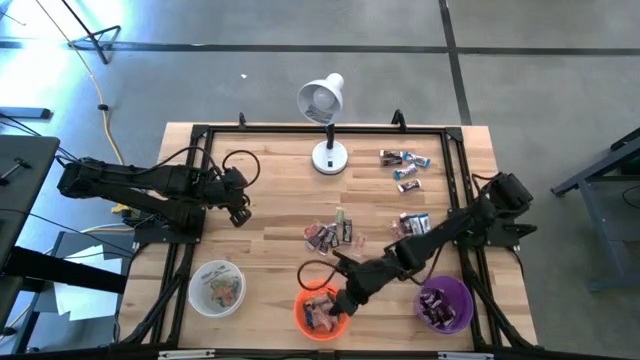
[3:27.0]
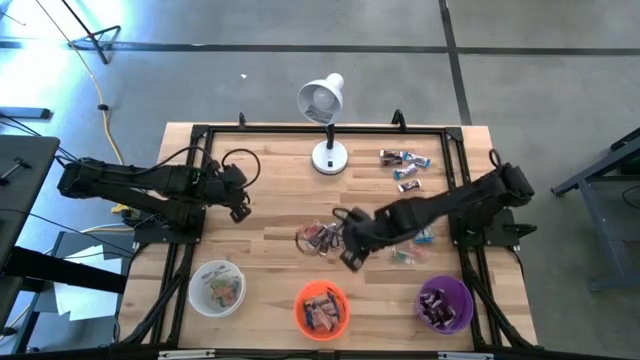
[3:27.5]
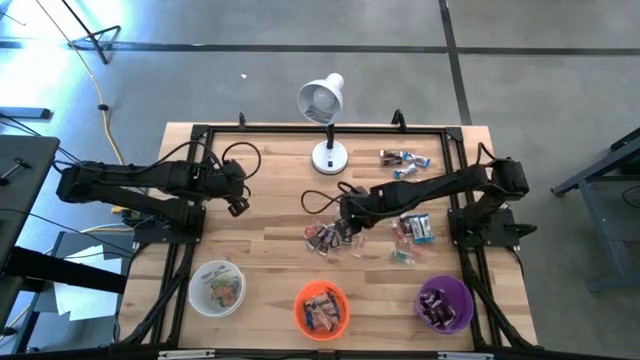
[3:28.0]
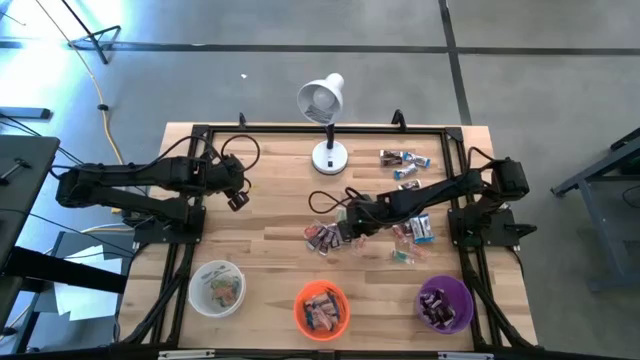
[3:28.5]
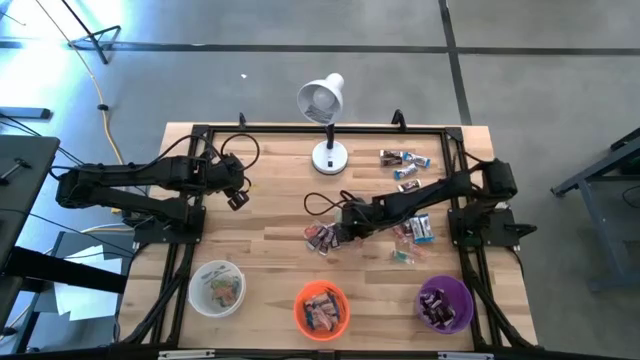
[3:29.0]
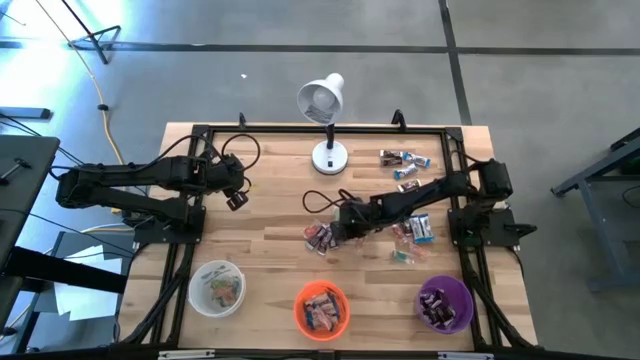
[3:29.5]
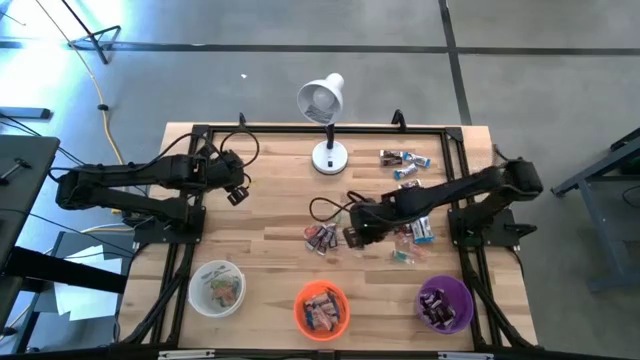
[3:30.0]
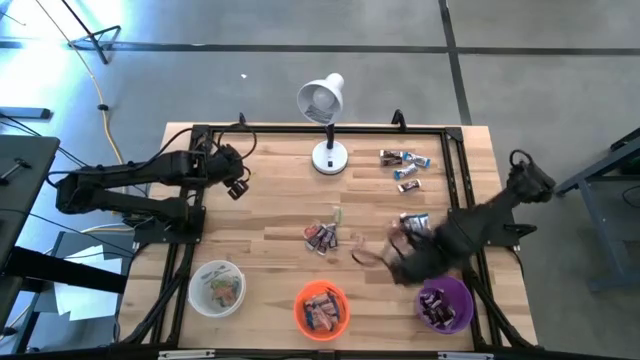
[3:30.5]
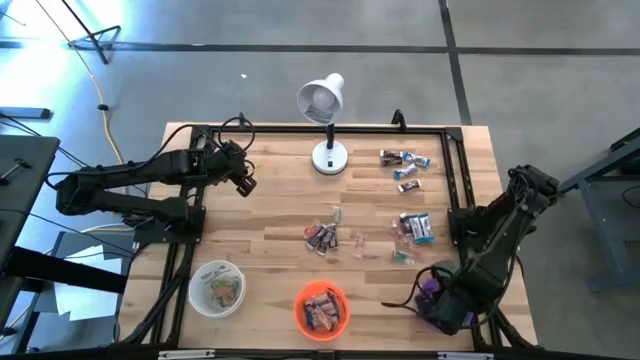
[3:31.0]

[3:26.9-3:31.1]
Task: Organize candy in baskets
Put the brown chocolate bar into the purple bucket

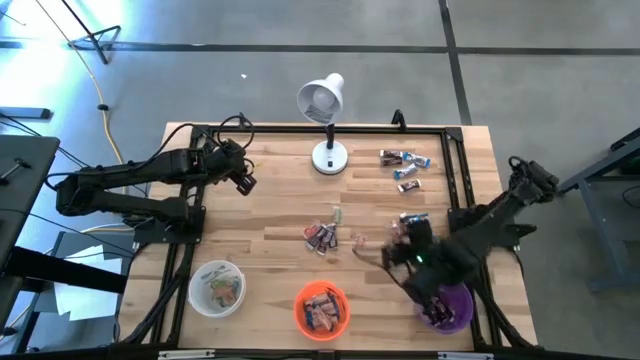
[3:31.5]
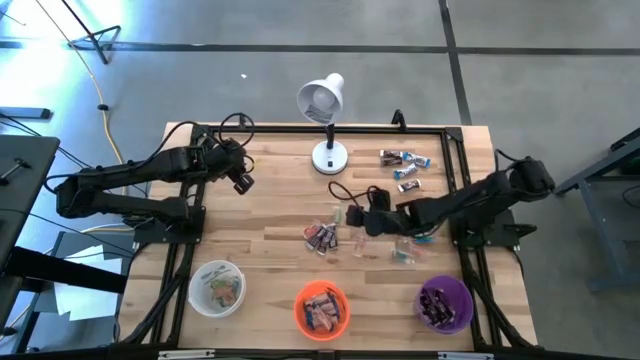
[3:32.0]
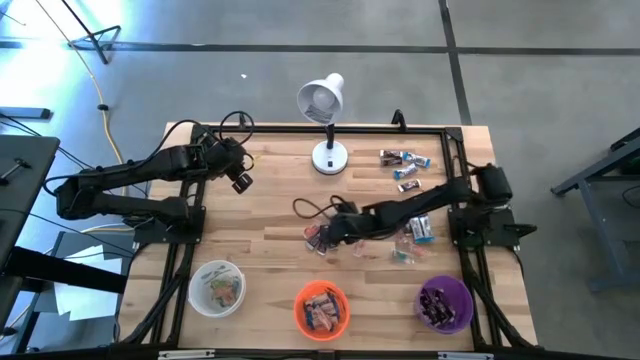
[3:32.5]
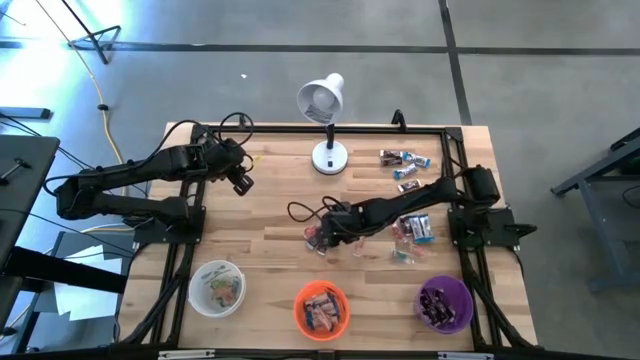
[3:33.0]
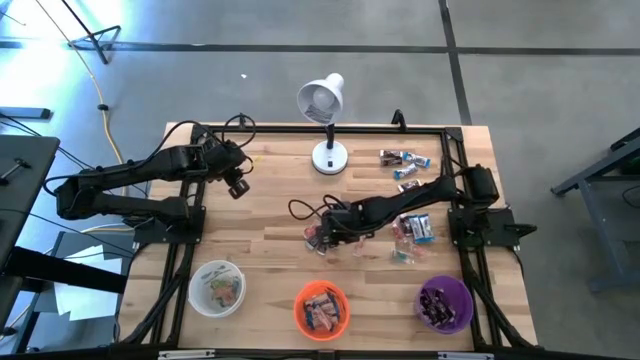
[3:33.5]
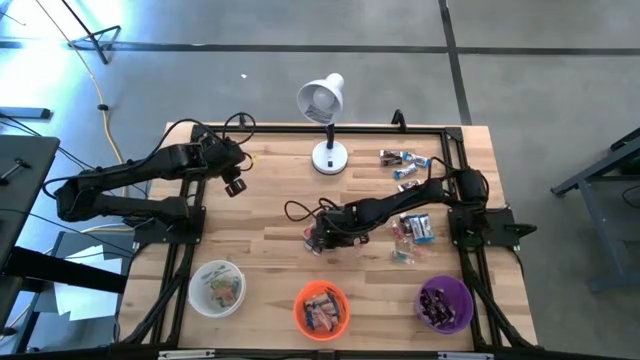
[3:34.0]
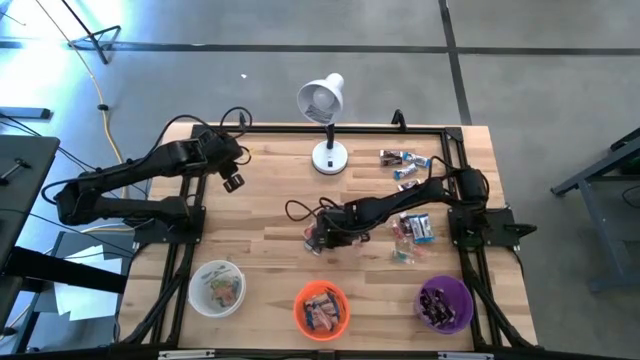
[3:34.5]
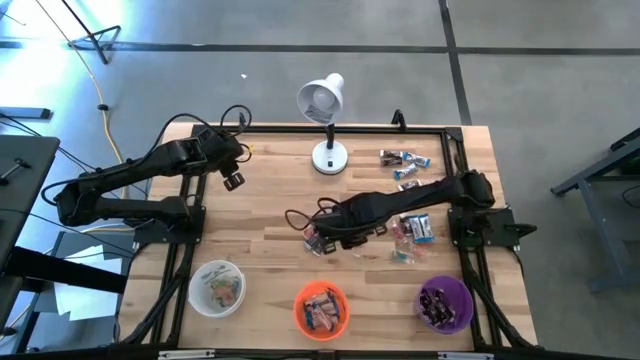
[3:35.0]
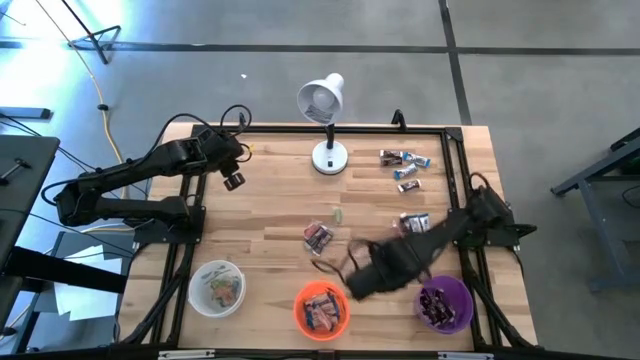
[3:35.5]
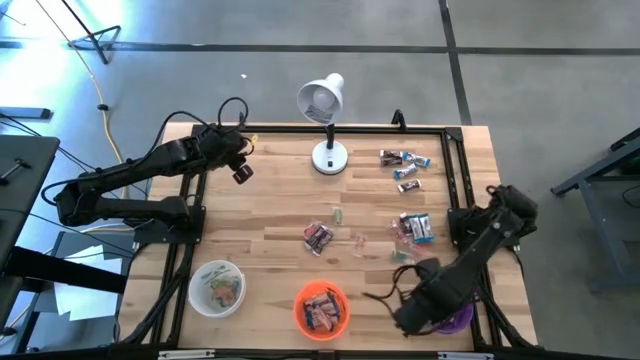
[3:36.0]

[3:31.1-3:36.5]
Put the brown chocolate bar into the purple bucket

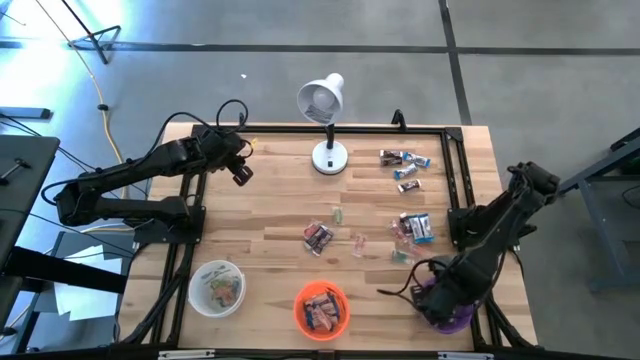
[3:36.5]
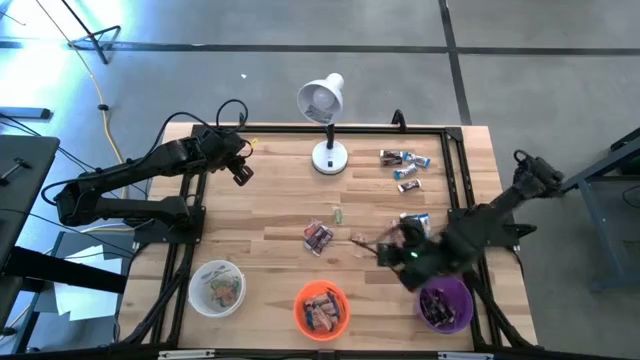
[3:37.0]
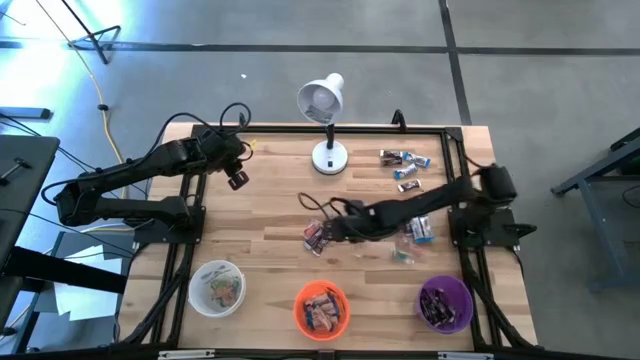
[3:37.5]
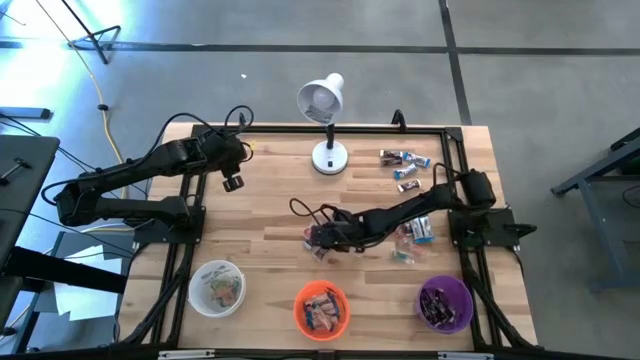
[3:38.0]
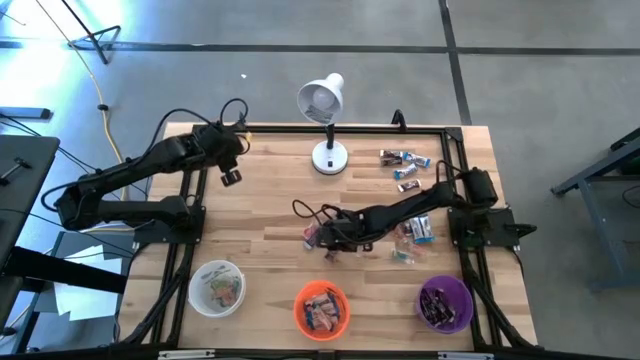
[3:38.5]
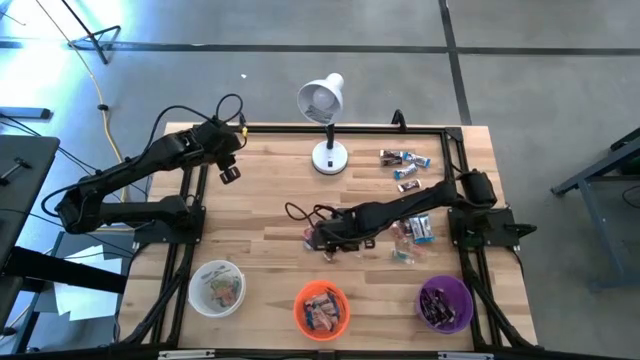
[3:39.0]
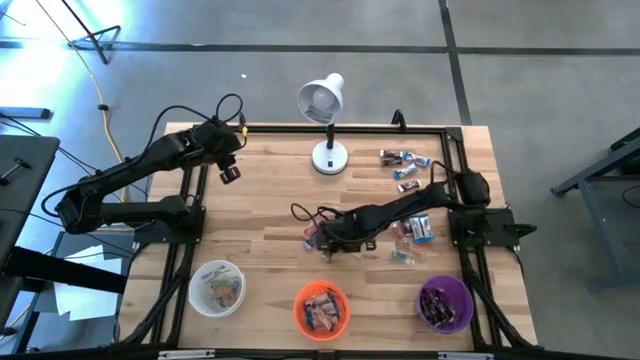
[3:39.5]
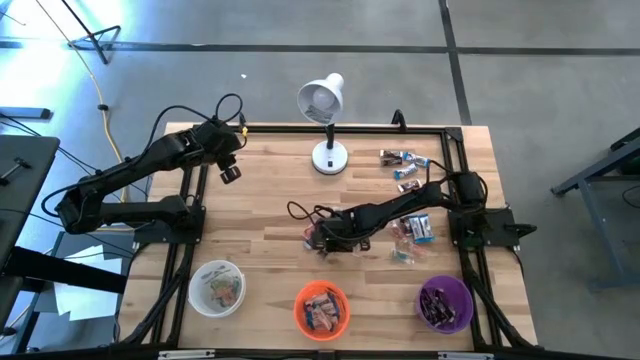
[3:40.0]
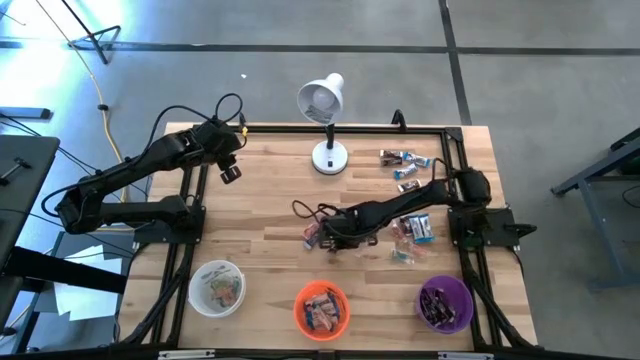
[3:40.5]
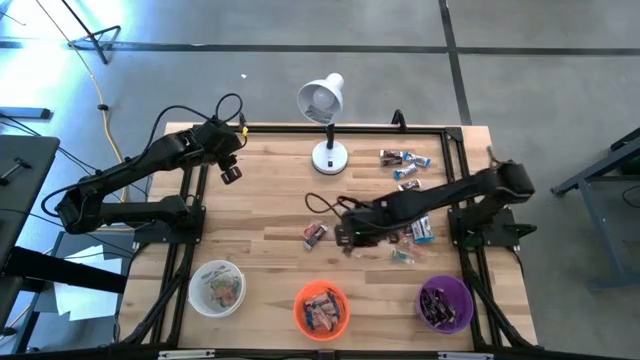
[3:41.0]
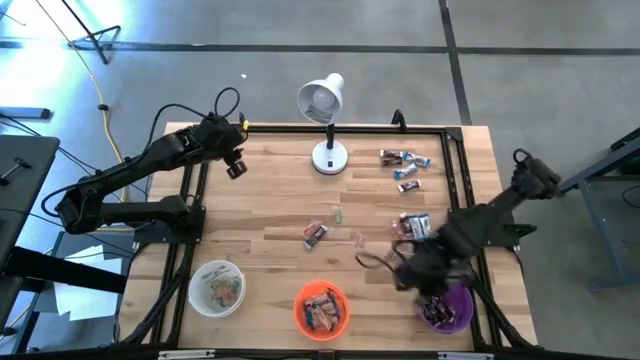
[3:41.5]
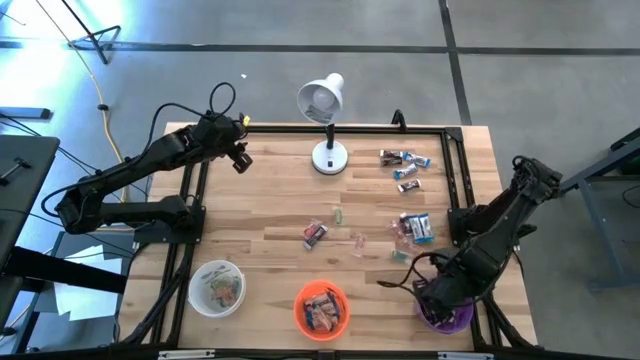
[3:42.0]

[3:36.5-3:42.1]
Put the brown chocolate bar into the purple bucket

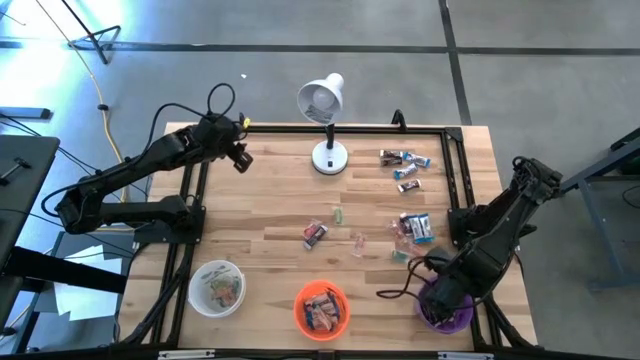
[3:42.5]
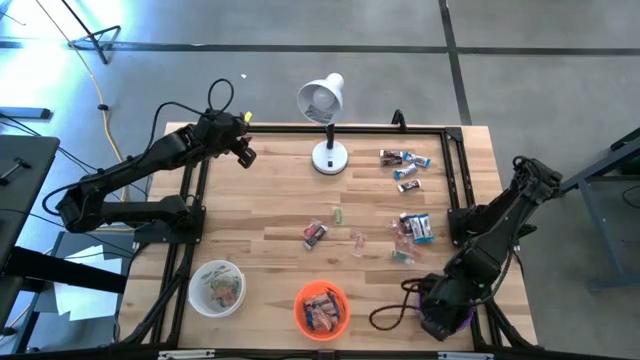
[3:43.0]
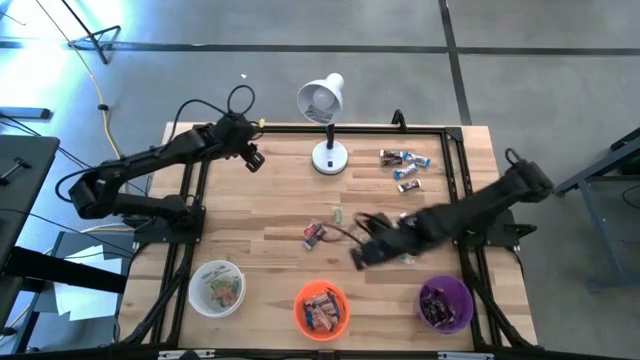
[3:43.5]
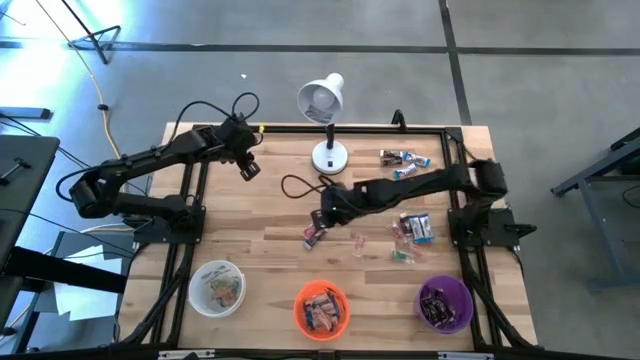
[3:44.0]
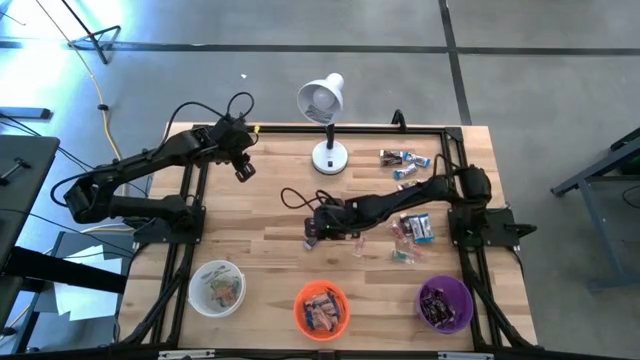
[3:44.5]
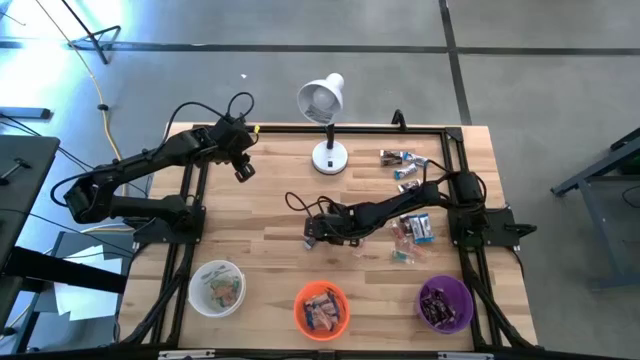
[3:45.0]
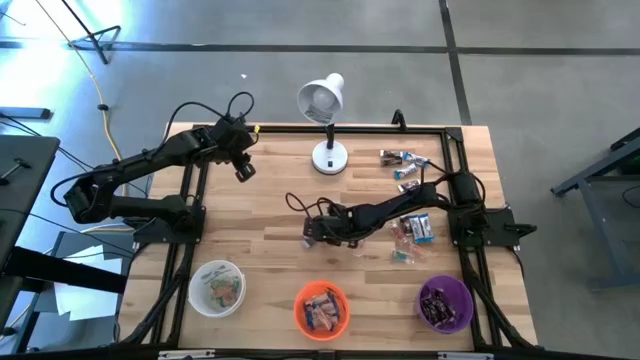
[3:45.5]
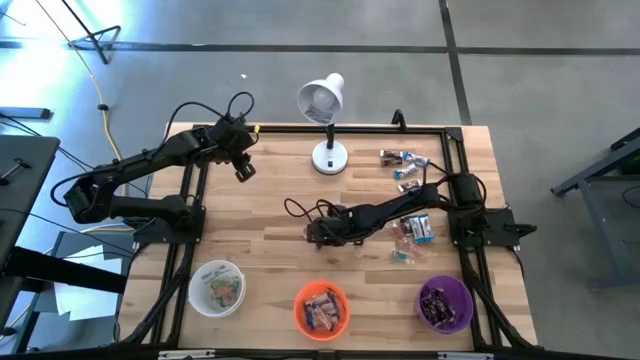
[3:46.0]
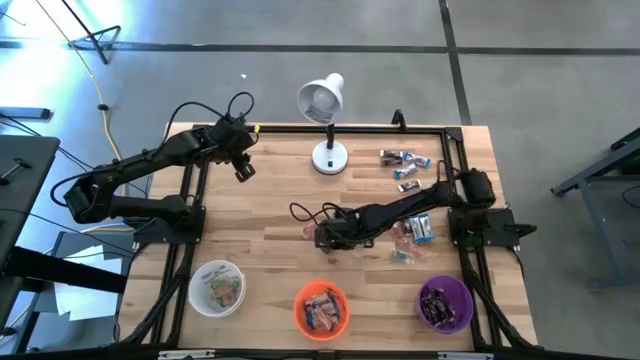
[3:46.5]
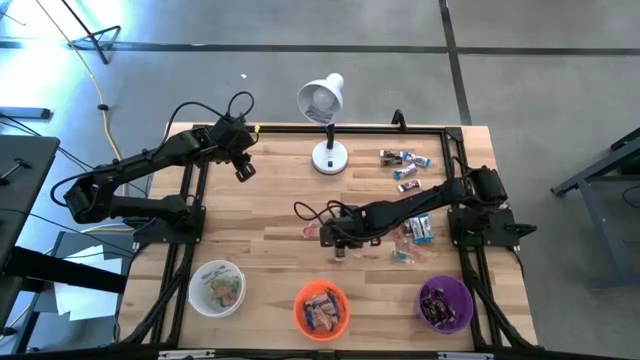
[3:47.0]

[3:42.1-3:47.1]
Put the brown chocolate bar into the purple bucket

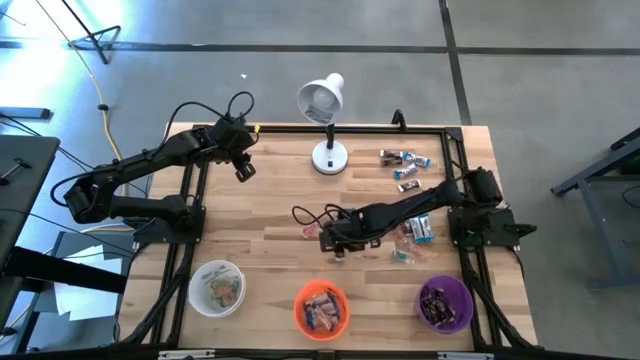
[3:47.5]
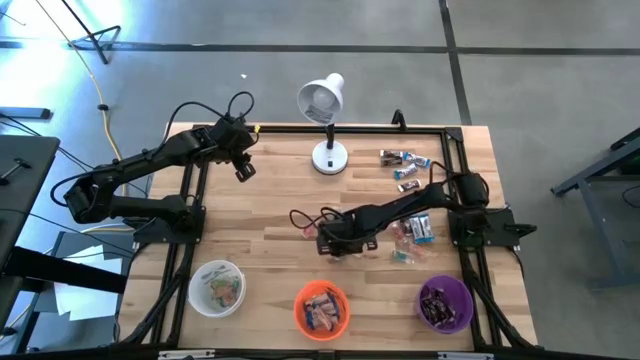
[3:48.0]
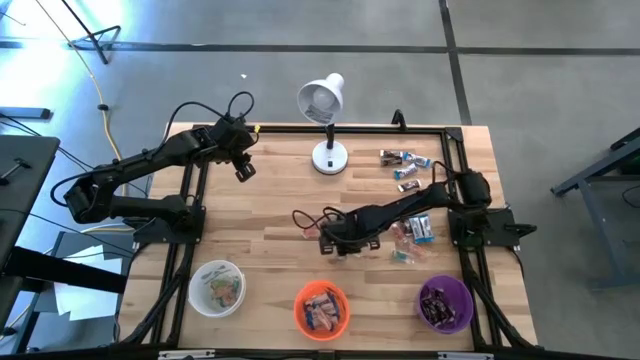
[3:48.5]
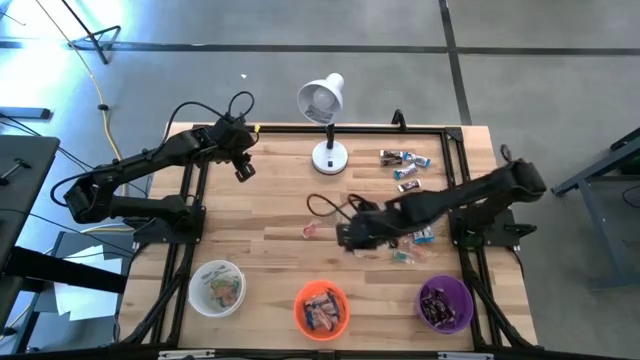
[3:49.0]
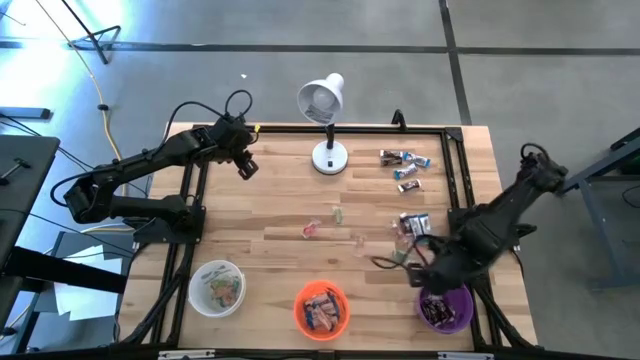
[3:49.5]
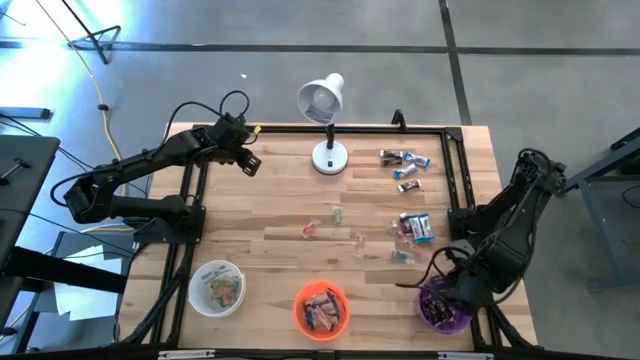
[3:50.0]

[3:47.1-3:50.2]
Put the brown chocolate bar into the purple bucket
